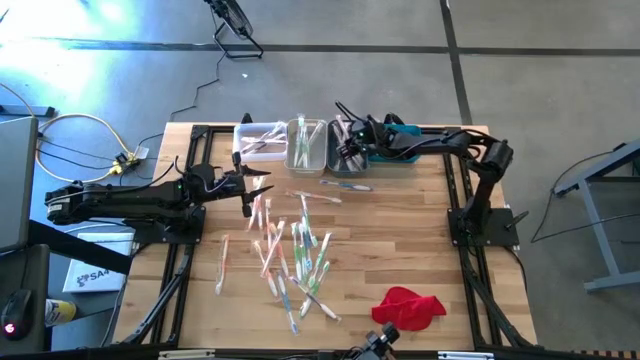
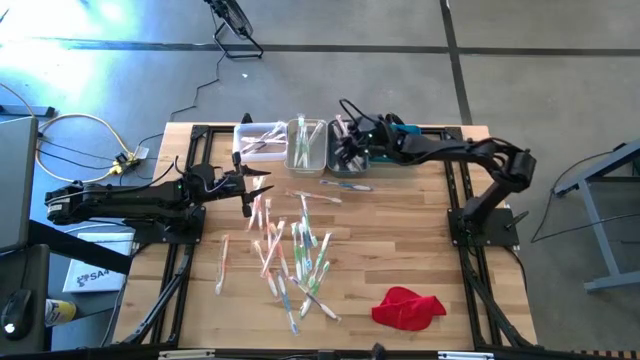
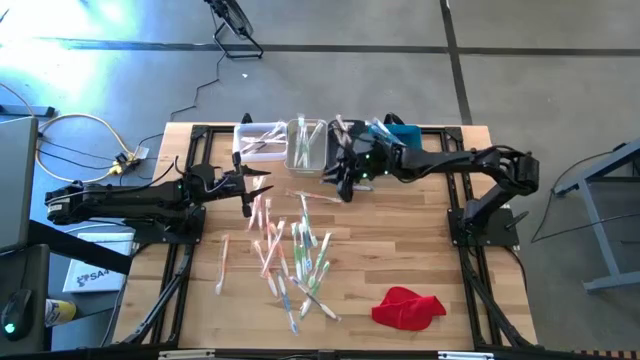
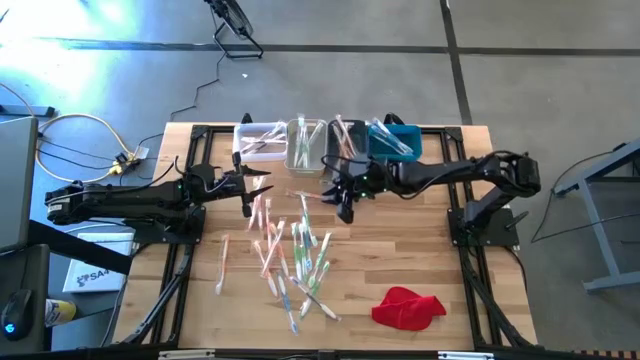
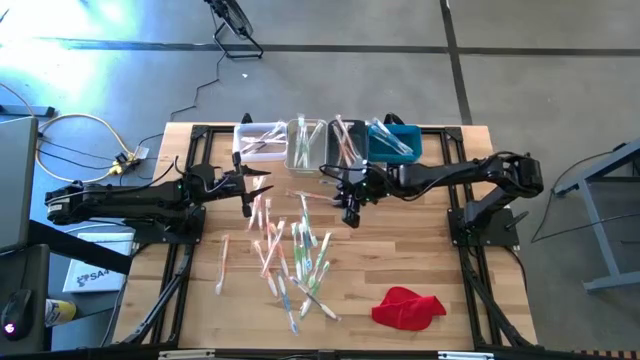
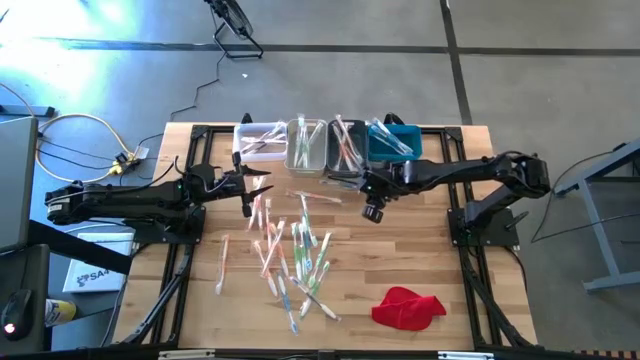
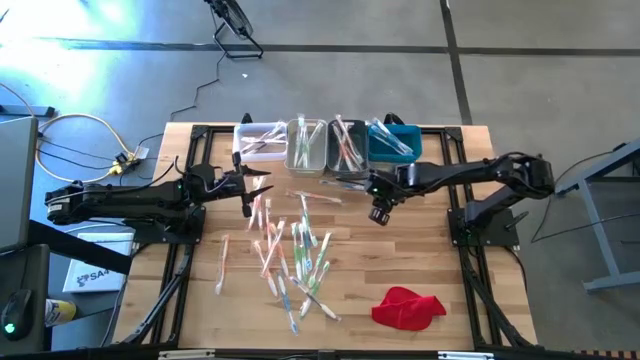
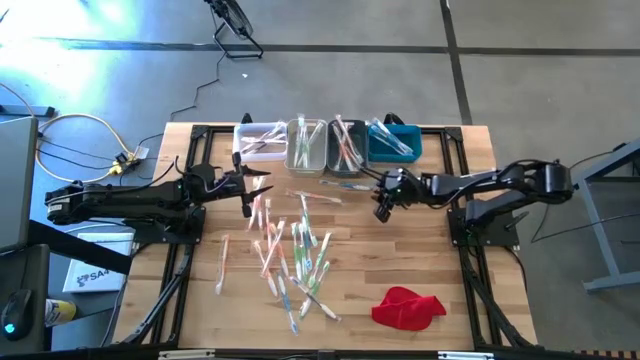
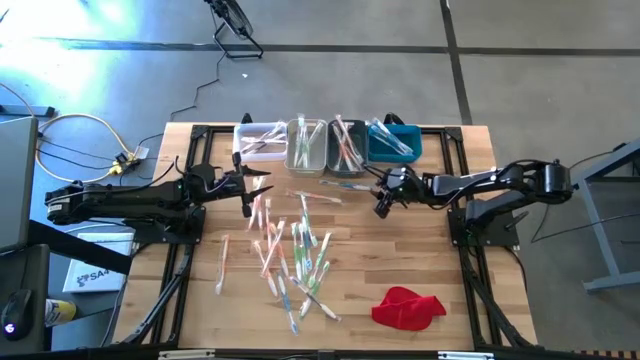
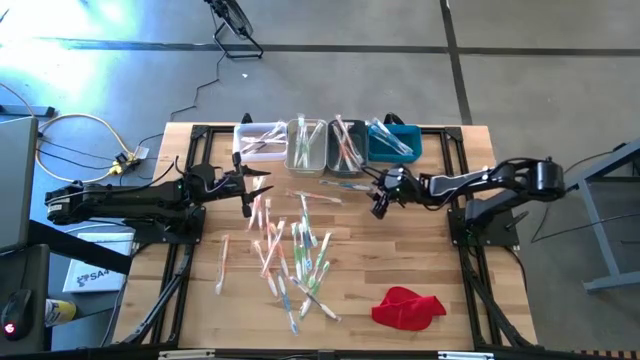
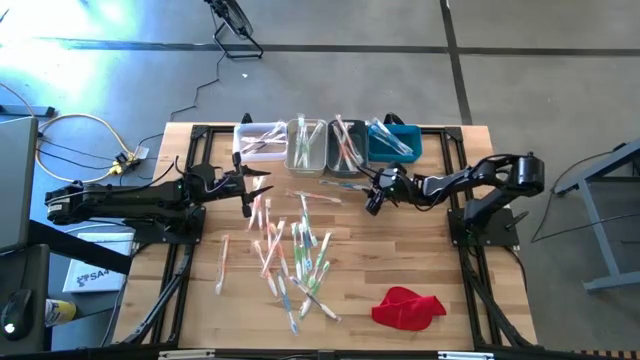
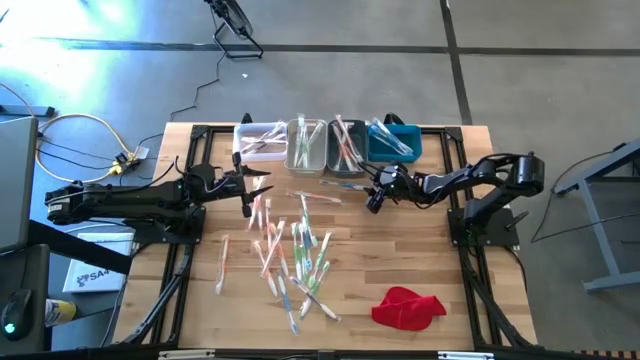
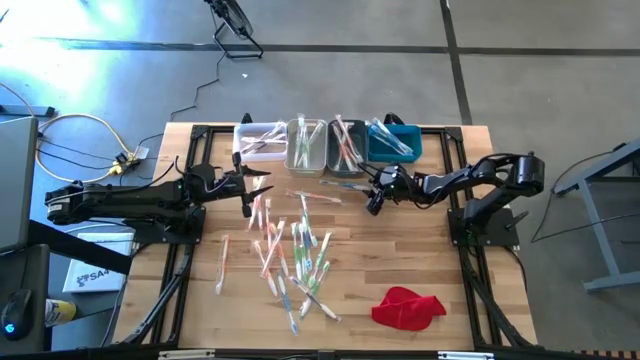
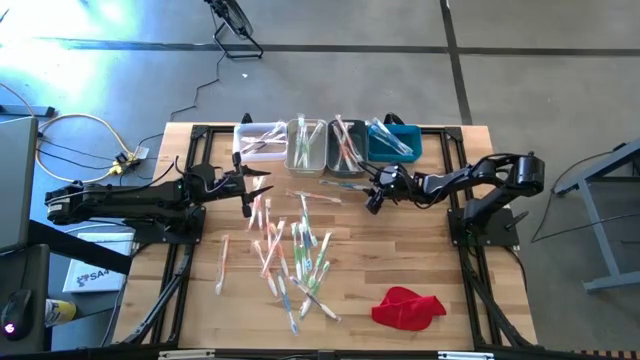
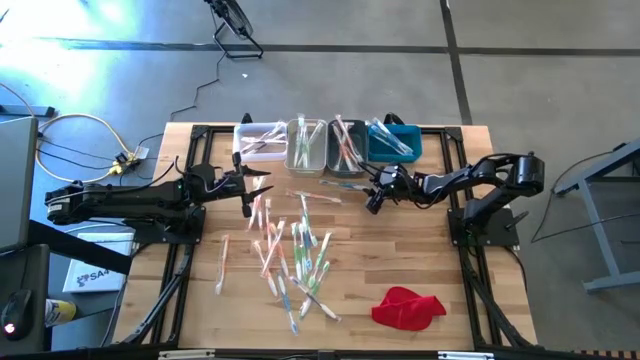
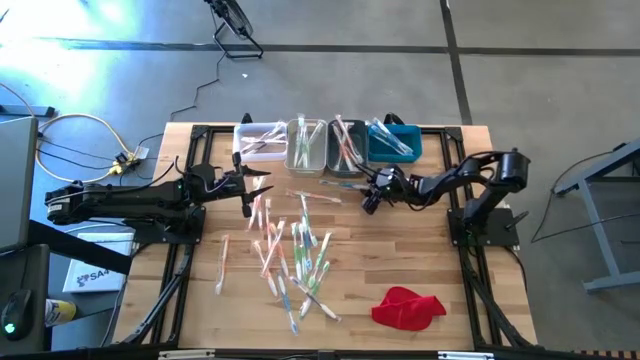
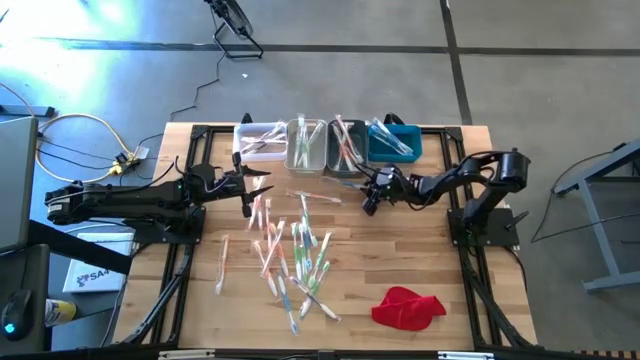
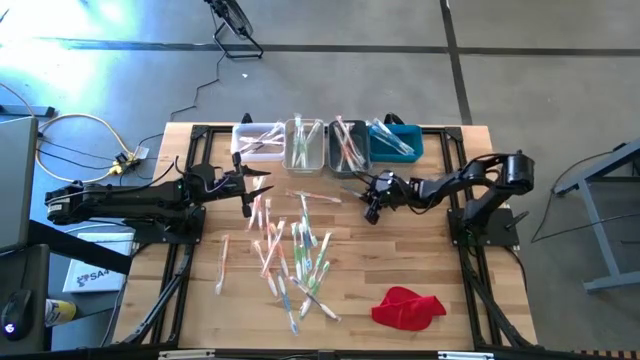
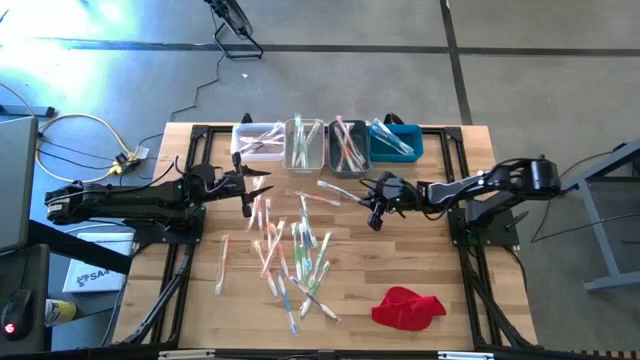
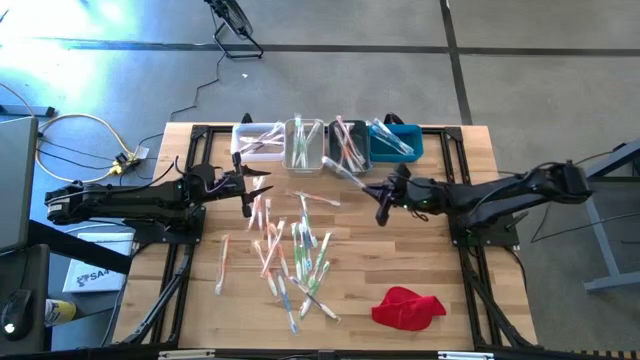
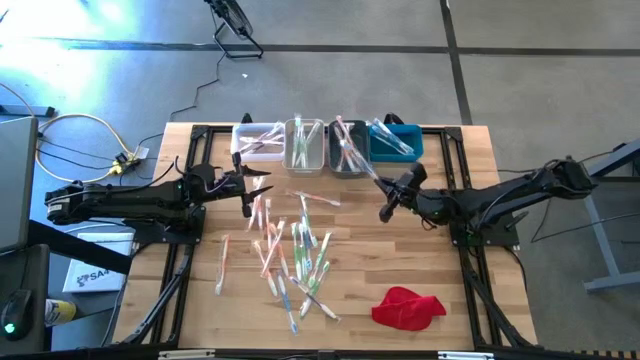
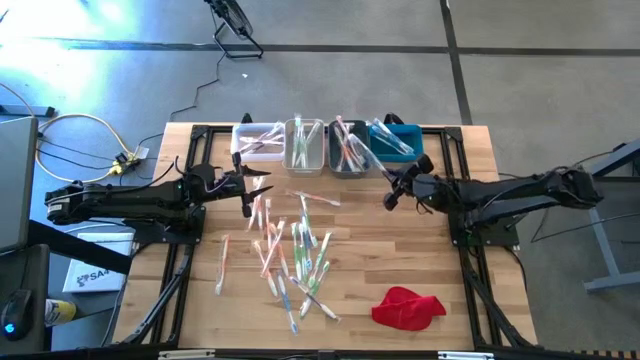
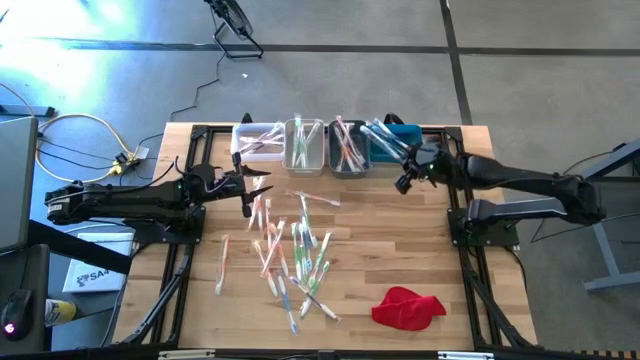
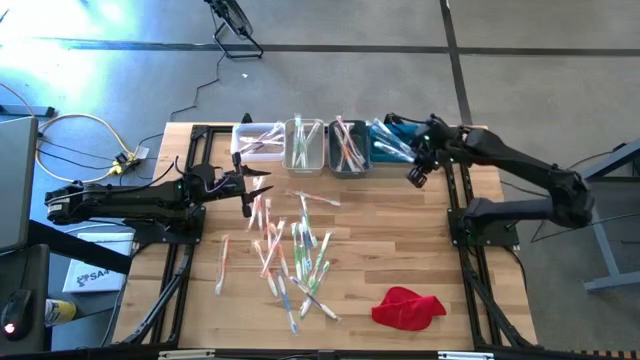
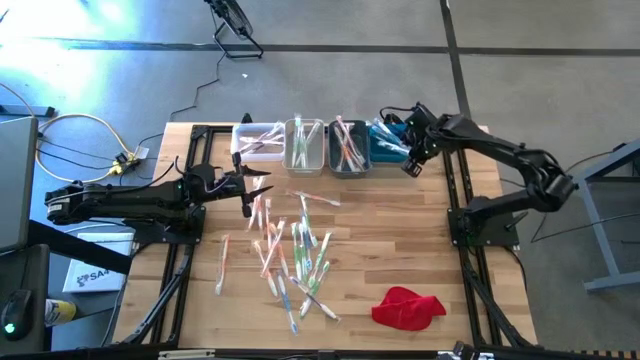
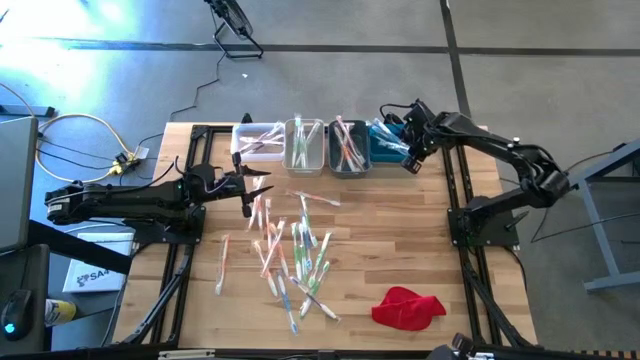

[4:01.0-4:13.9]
Task: Pick & Place Toothbrushes
Put the blue toothbrush into the blue bin

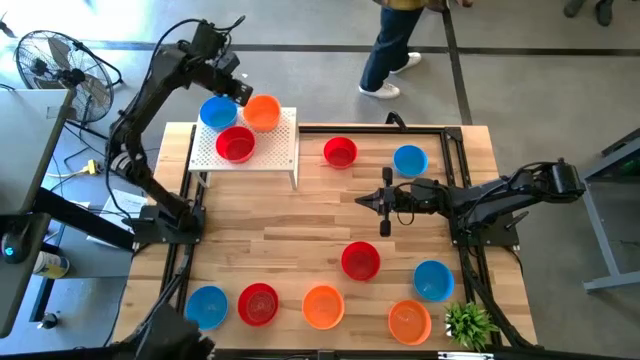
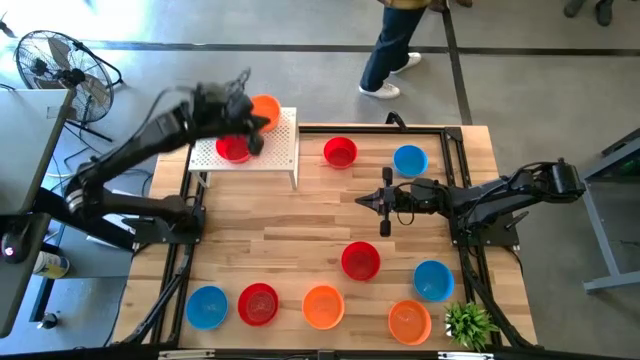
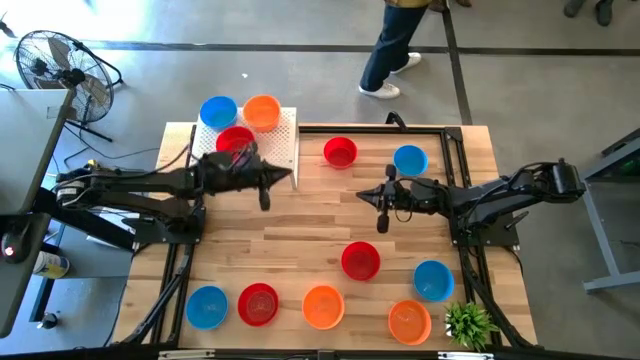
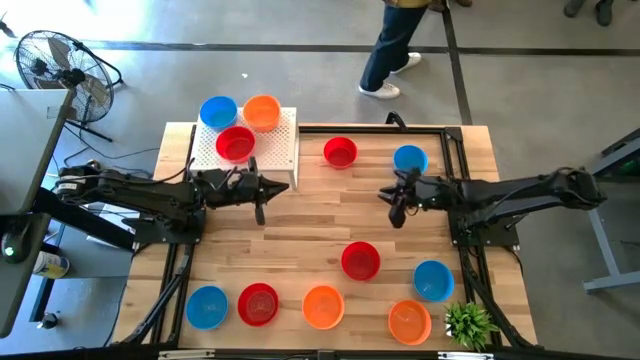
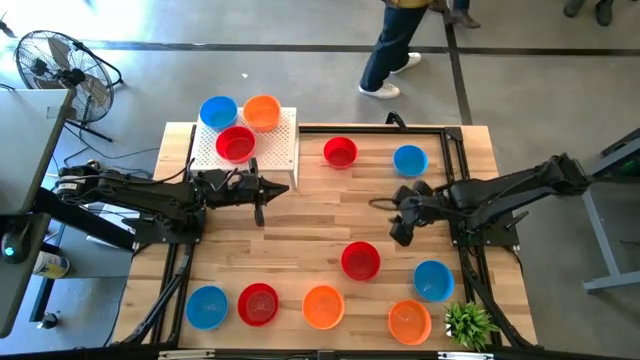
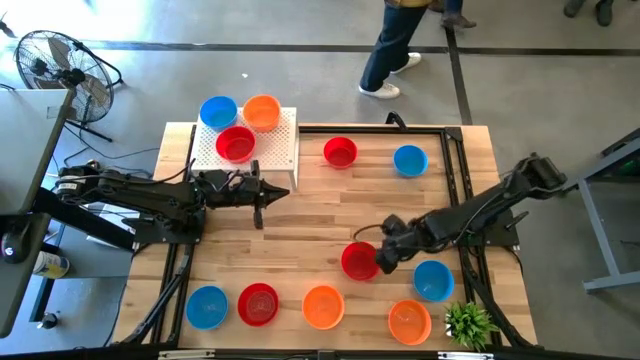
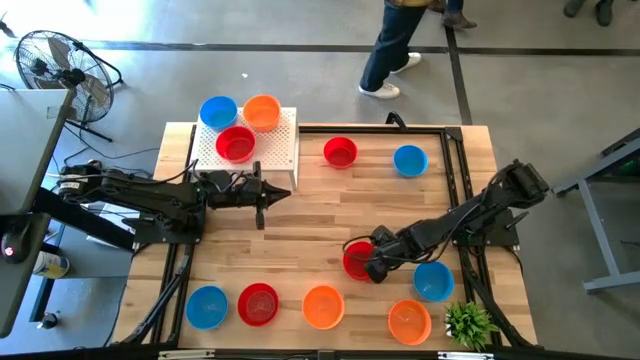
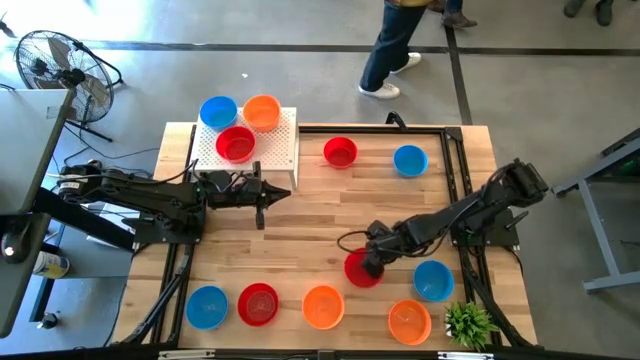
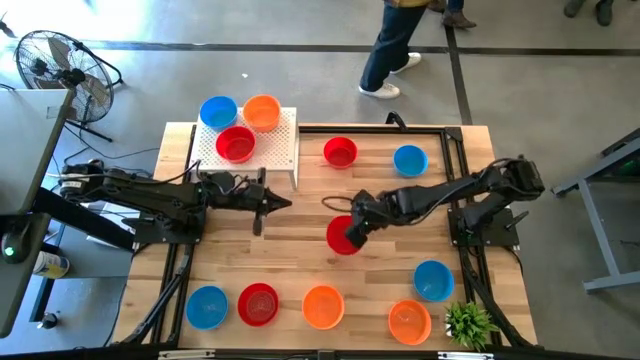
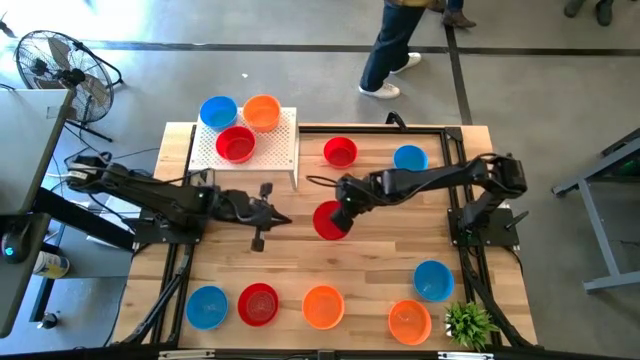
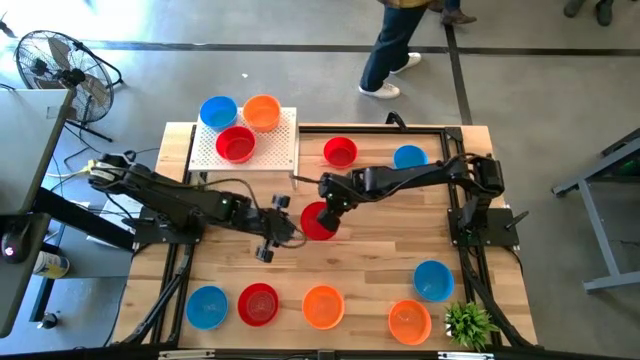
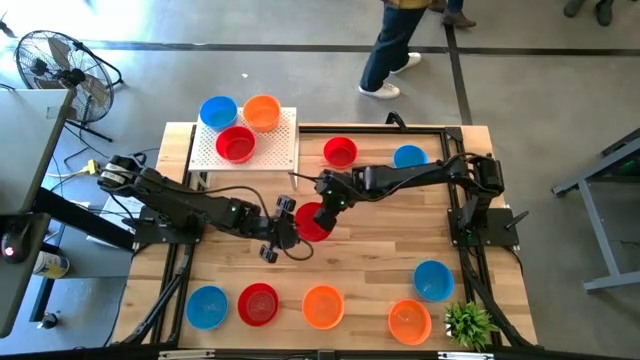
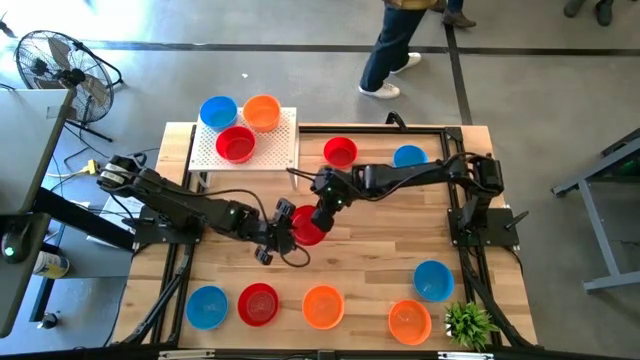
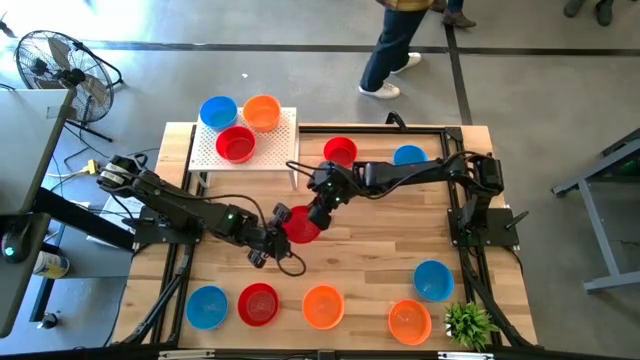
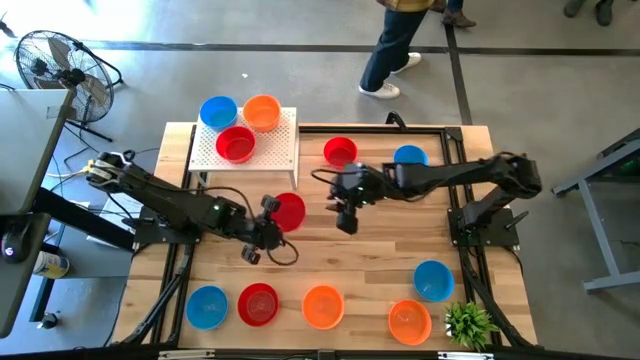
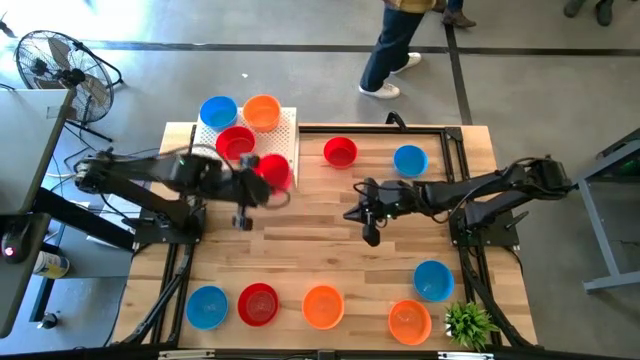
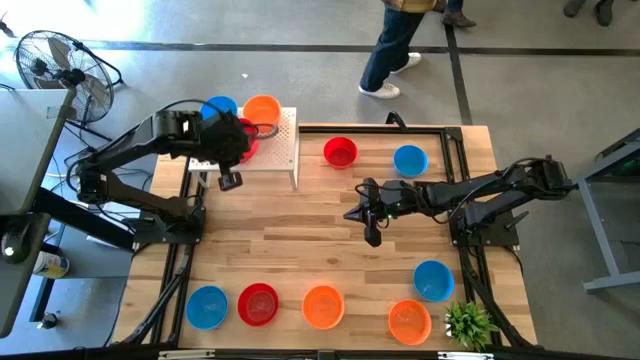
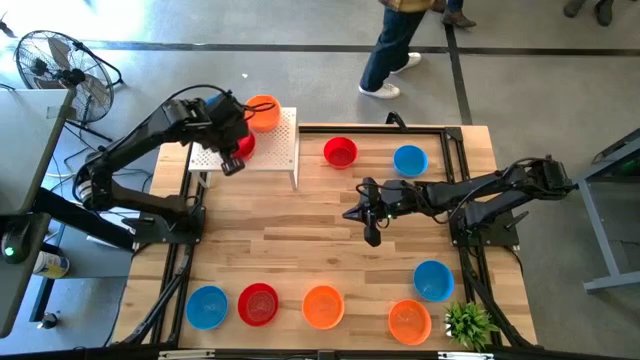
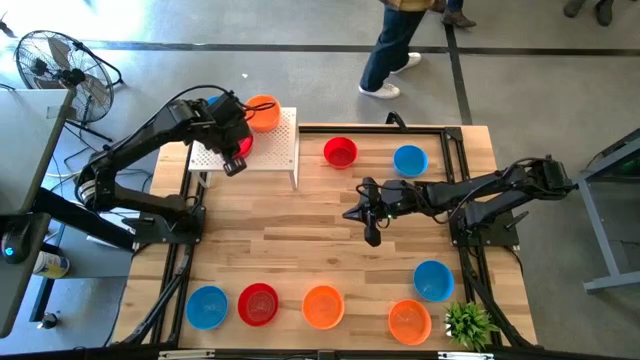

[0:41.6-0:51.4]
Task: Pick & Place Mini bowls
Stack the red bowl on top of the red bowl on the shelf
